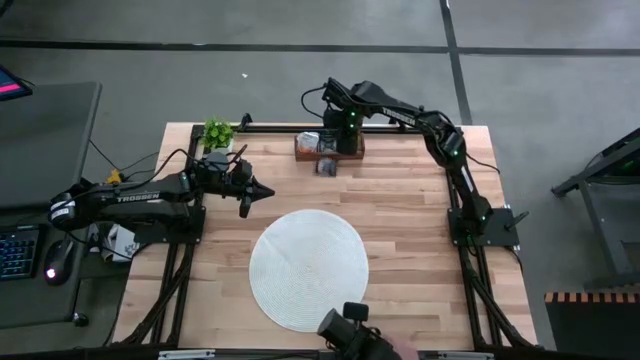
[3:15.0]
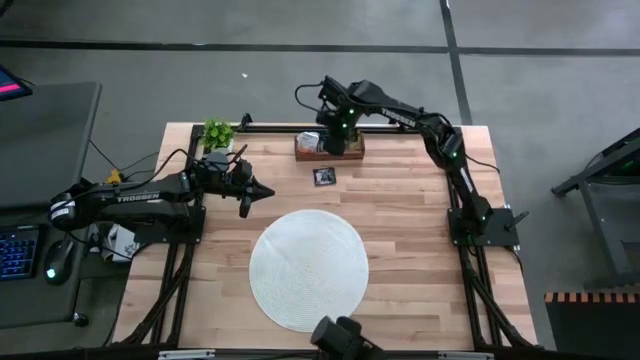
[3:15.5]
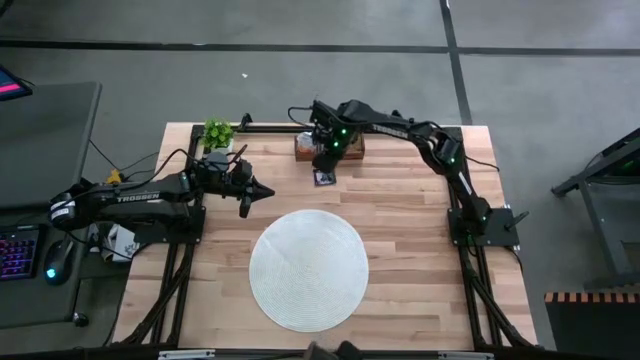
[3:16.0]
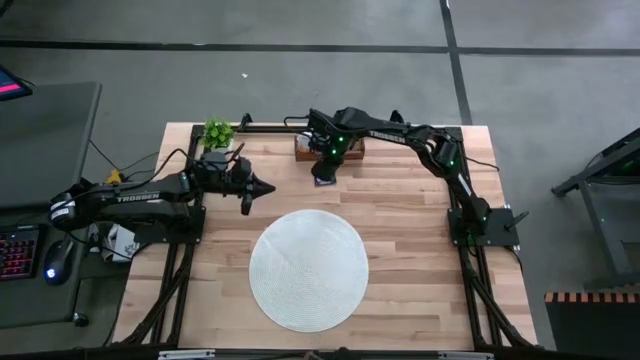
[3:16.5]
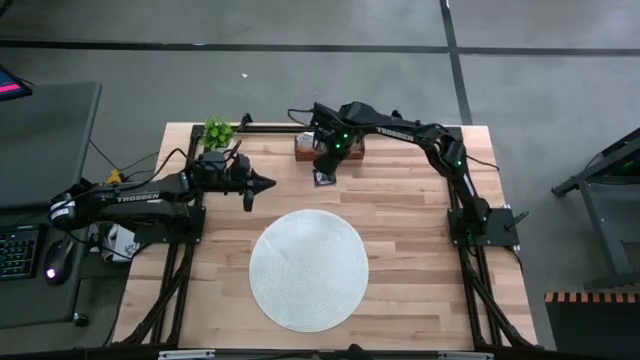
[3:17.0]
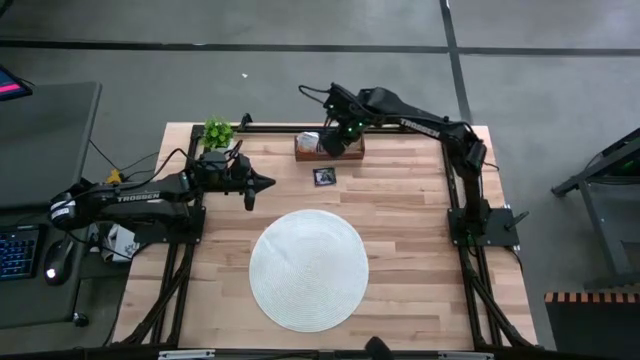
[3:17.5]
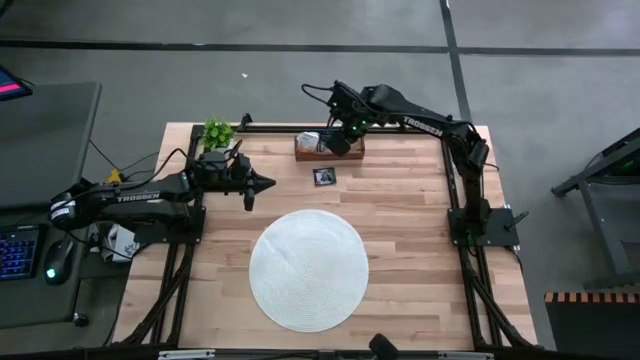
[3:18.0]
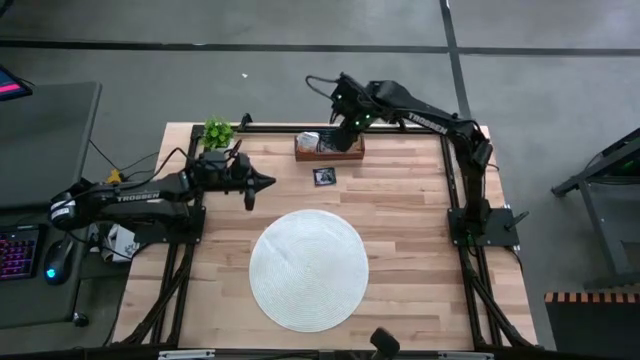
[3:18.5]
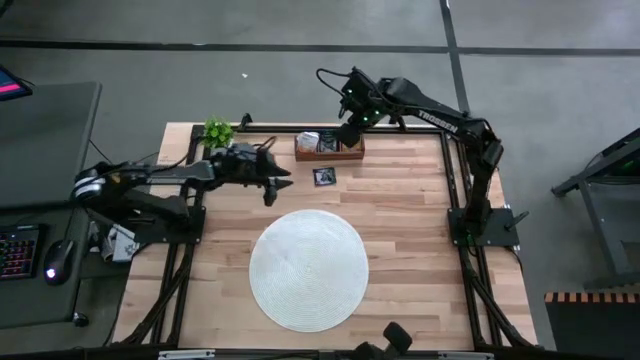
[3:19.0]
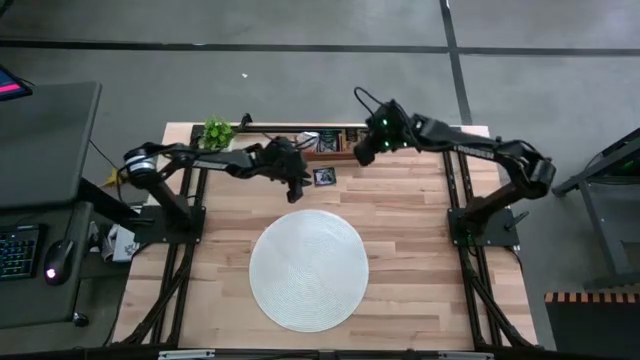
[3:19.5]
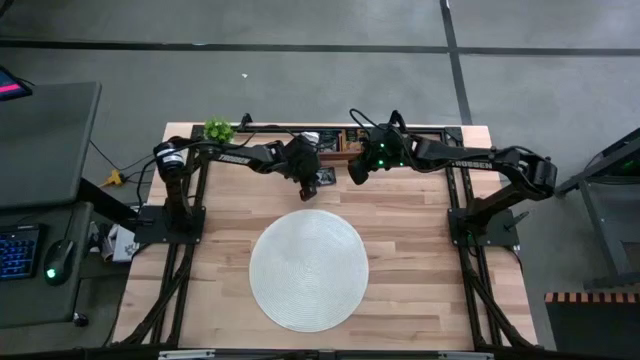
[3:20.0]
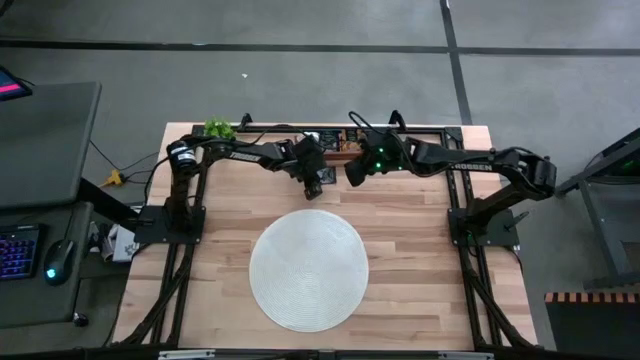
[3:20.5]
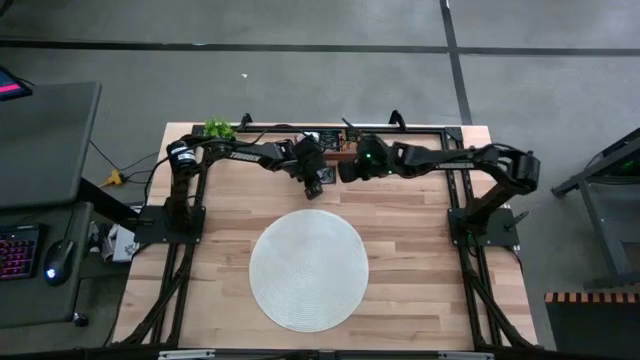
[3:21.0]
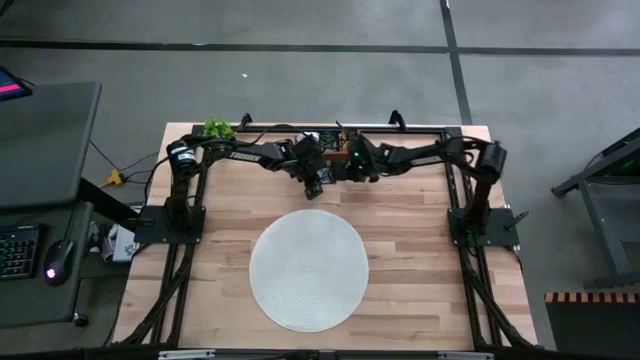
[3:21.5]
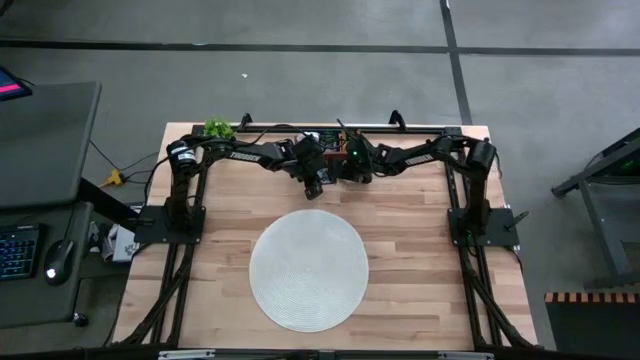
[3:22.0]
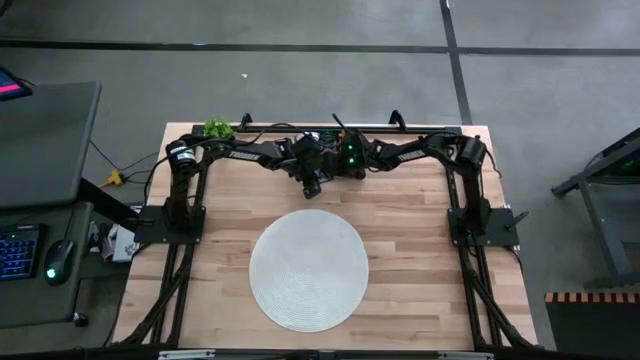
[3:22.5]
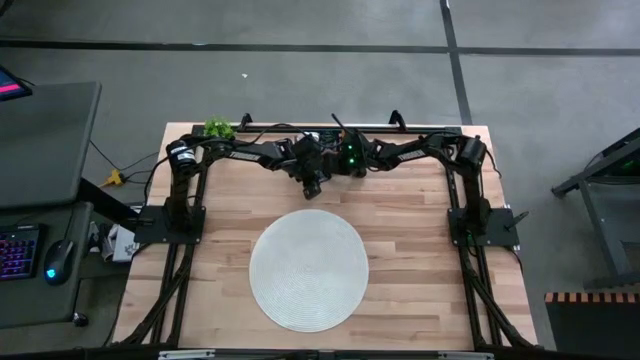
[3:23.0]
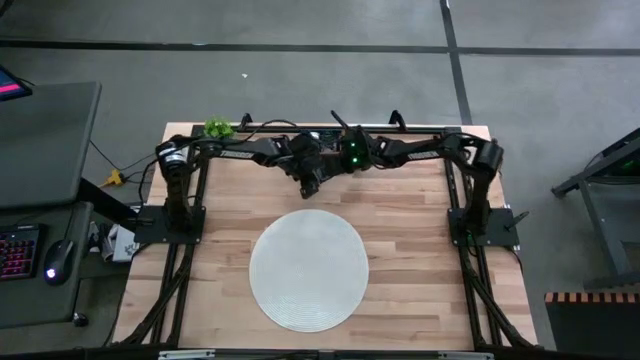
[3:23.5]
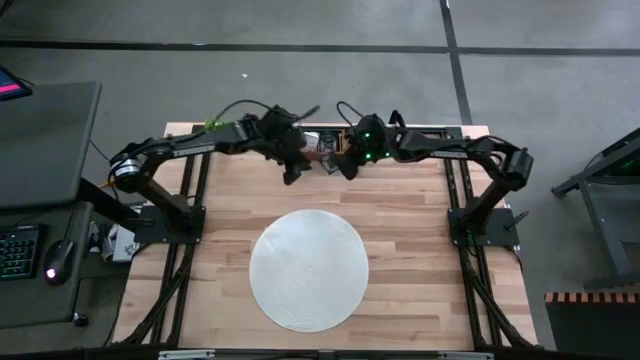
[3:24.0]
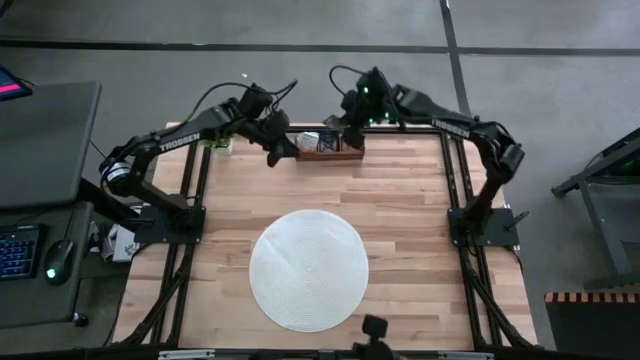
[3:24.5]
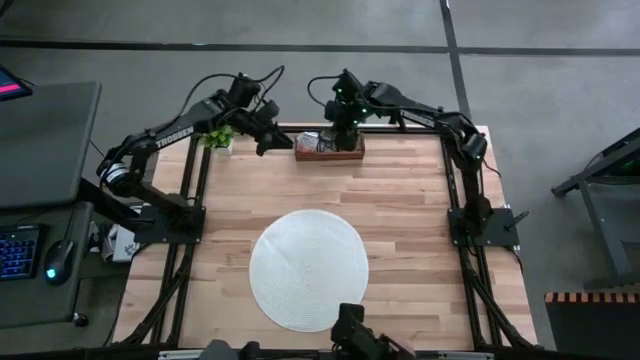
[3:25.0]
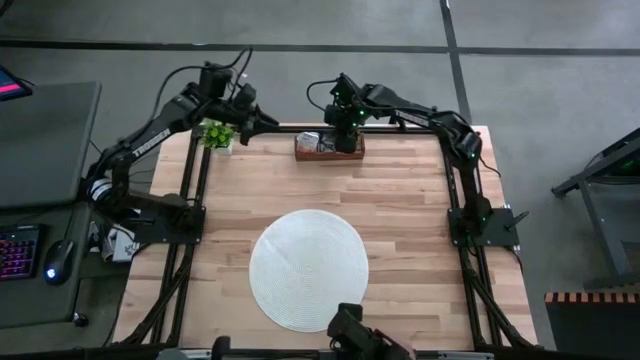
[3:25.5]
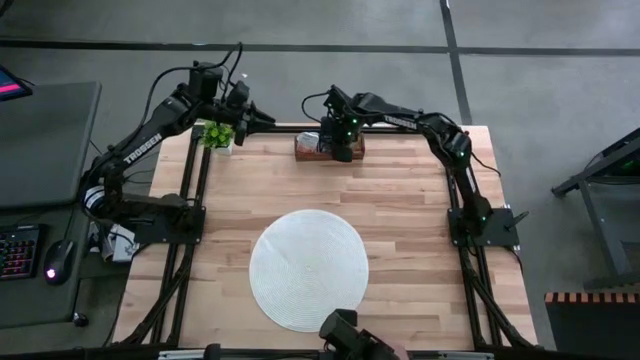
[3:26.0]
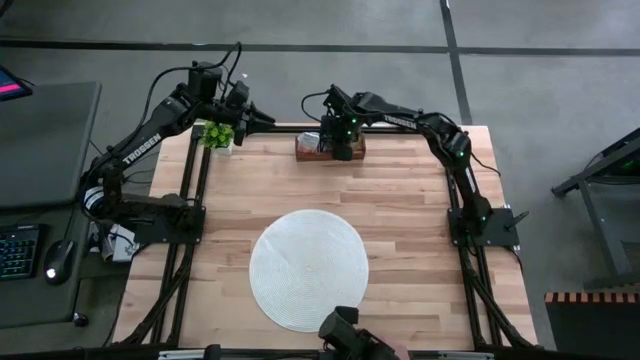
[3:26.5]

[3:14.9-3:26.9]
Task: Pick & Place Tea
Put the blue tea bag into the middle section of the wooden organizer

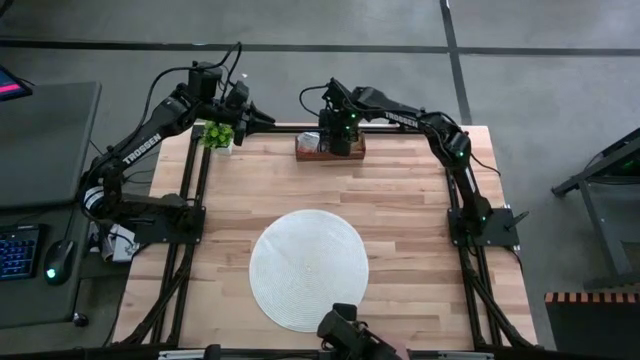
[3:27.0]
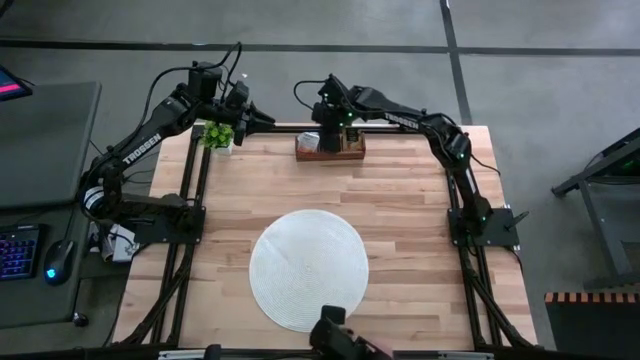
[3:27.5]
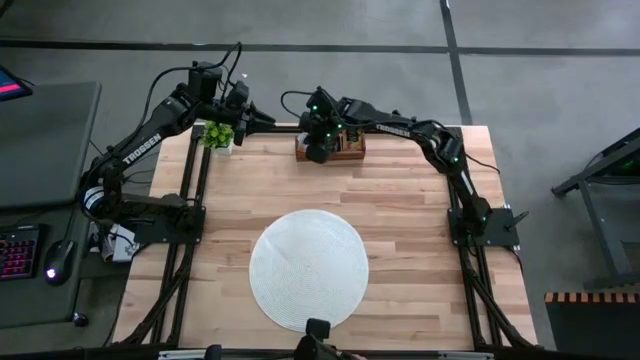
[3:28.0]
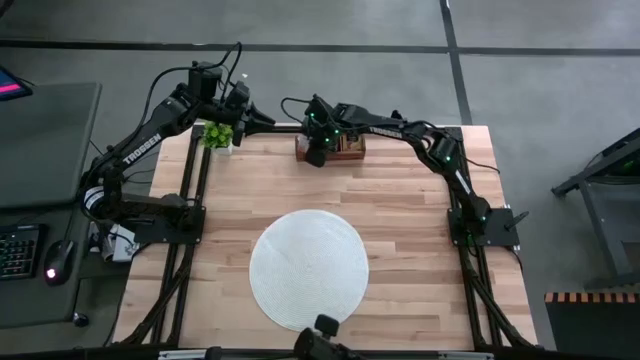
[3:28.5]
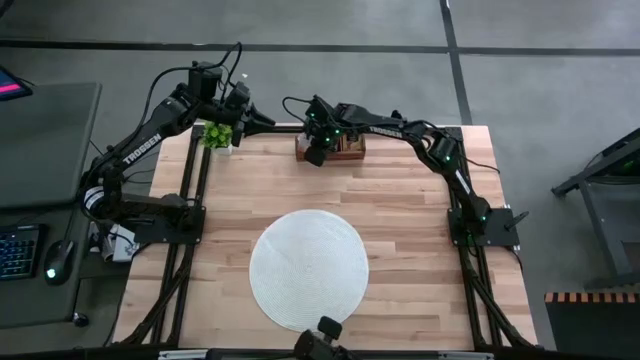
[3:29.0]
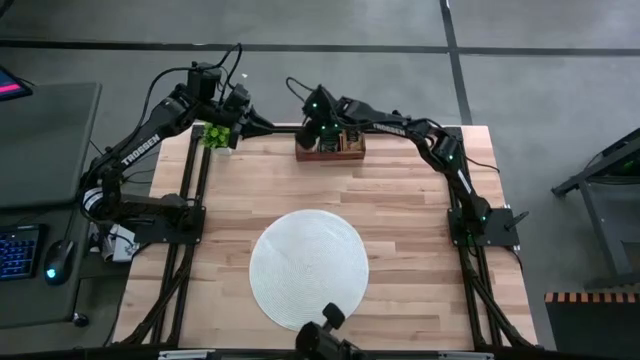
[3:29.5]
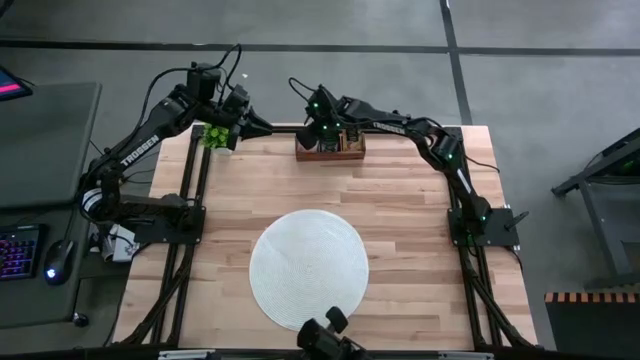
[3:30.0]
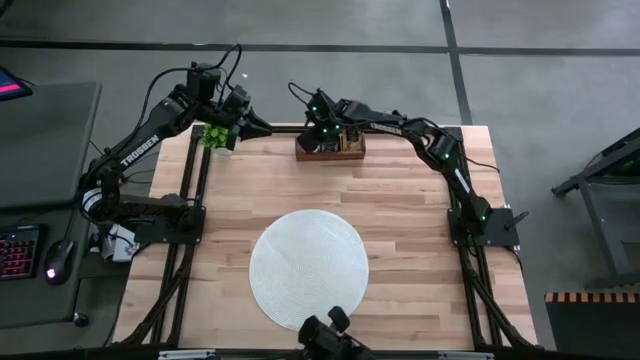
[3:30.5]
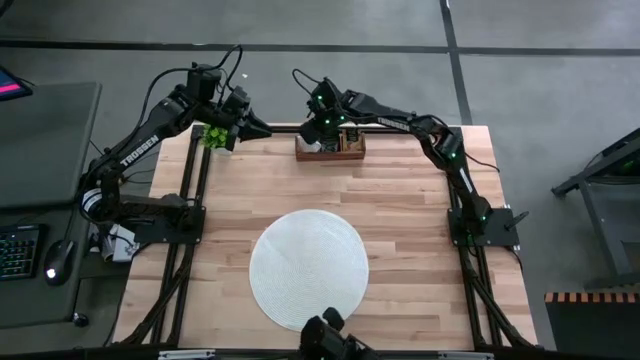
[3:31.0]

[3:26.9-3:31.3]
Adjust the white tea bags into the right section of the wooden organizer

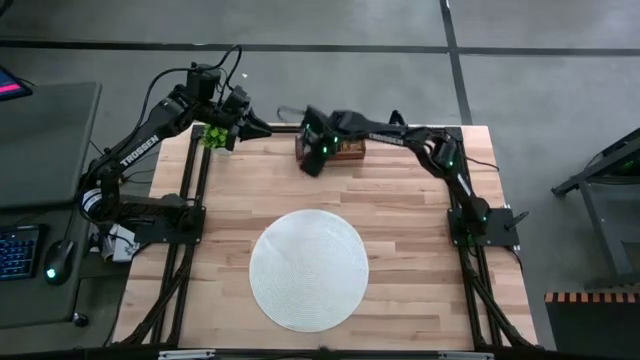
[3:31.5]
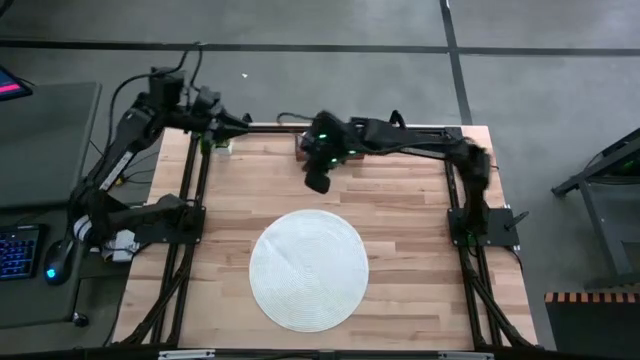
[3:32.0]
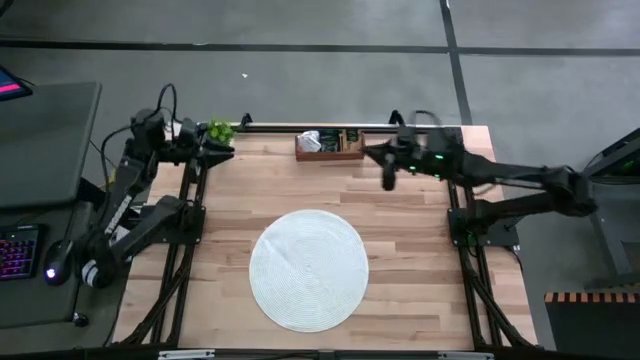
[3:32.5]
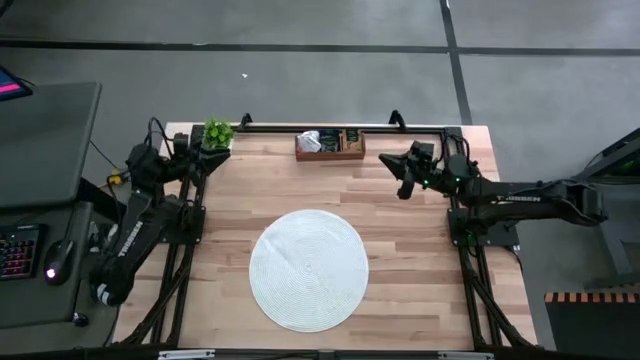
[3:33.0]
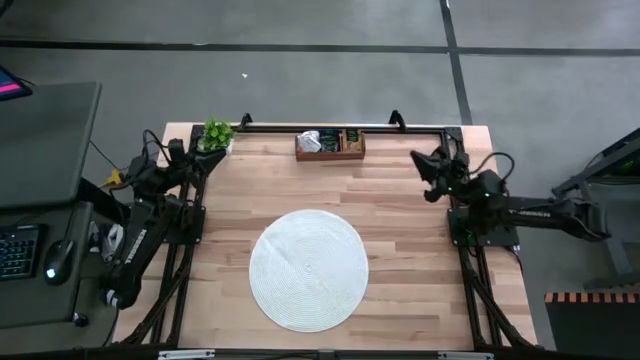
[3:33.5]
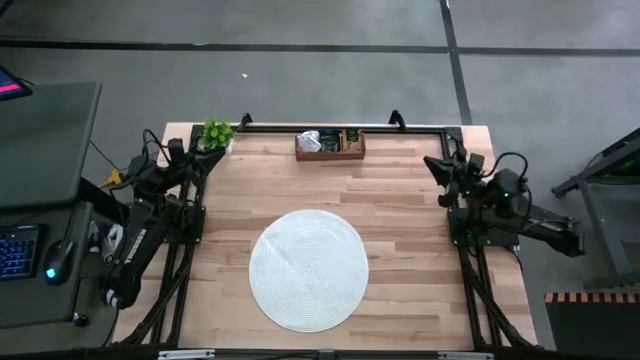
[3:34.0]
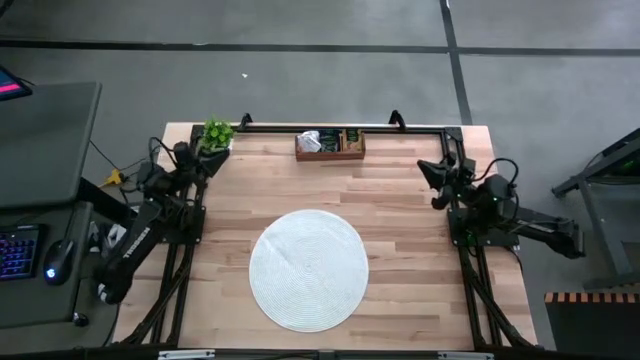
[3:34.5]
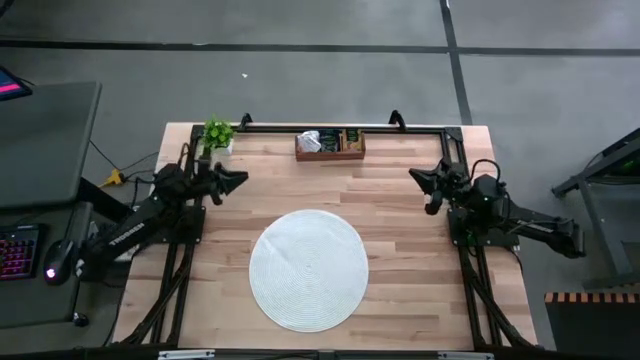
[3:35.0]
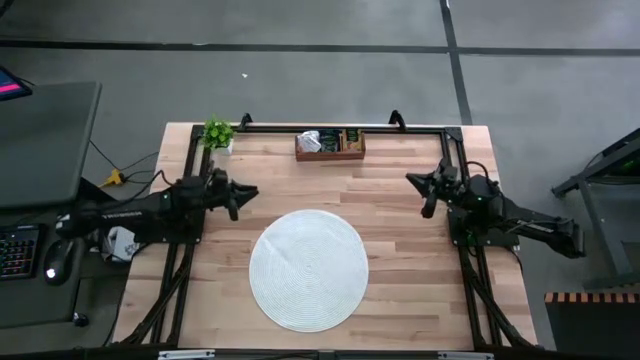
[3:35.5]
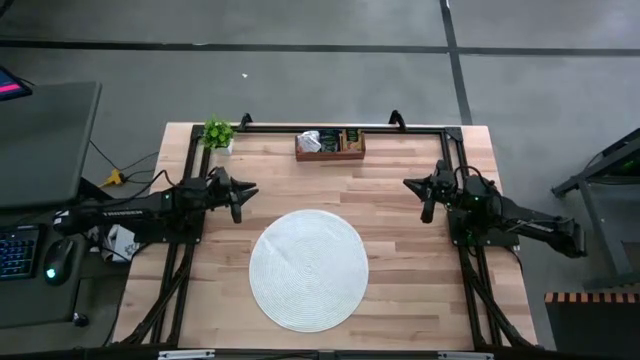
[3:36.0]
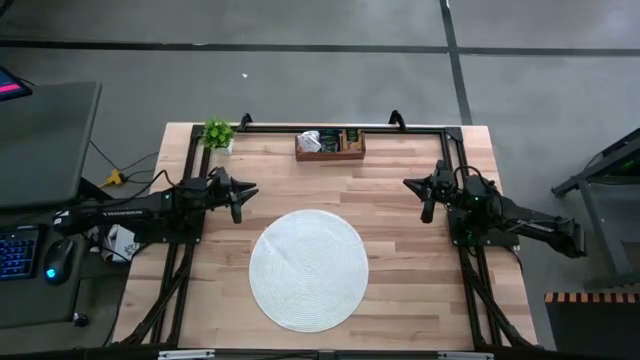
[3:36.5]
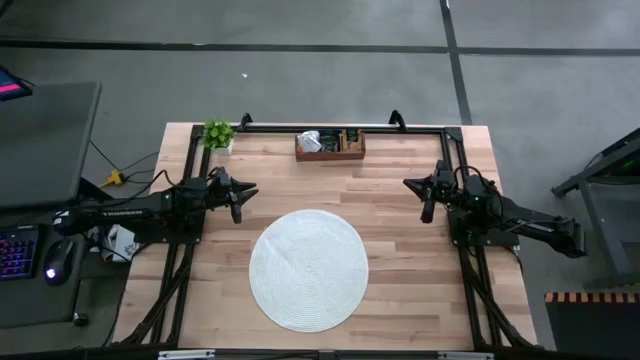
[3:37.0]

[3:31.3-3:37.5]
Return to Home Position
